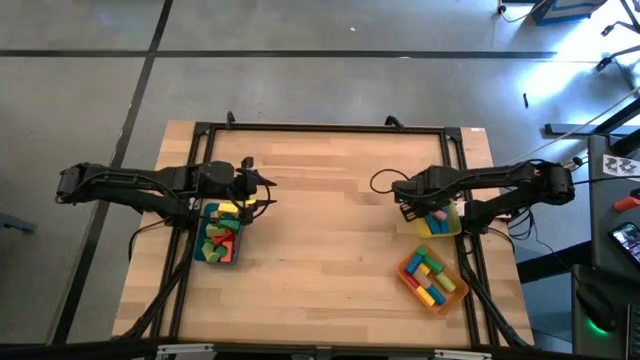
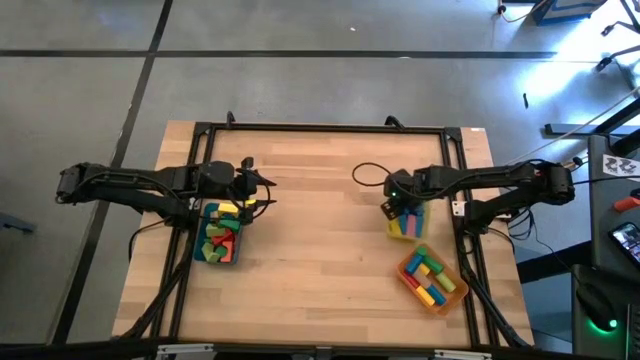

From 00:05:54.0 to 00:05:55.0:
Task: Sort blocks by size
Adjust the yellow bin on the table

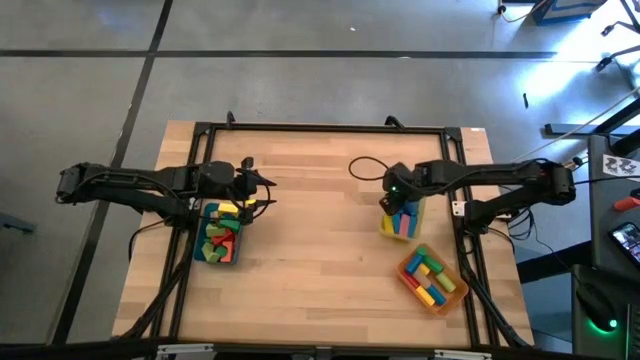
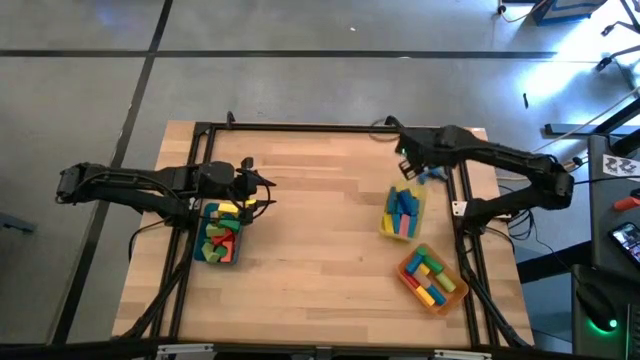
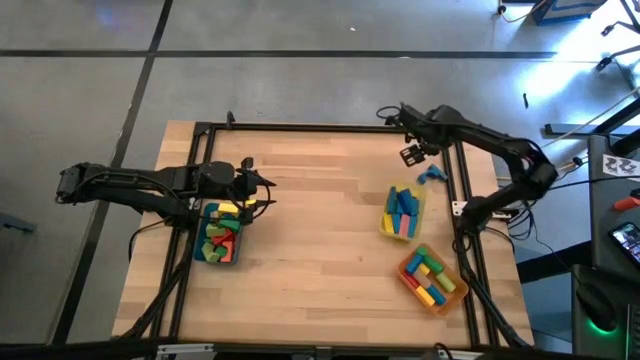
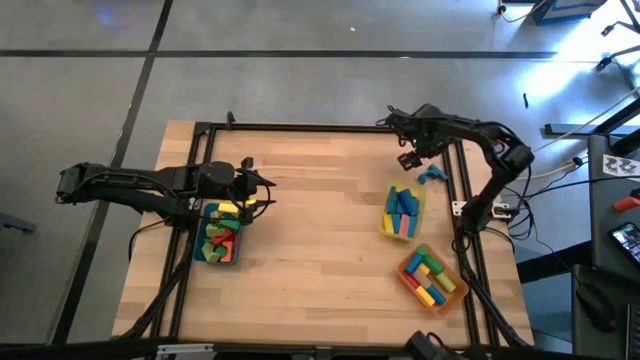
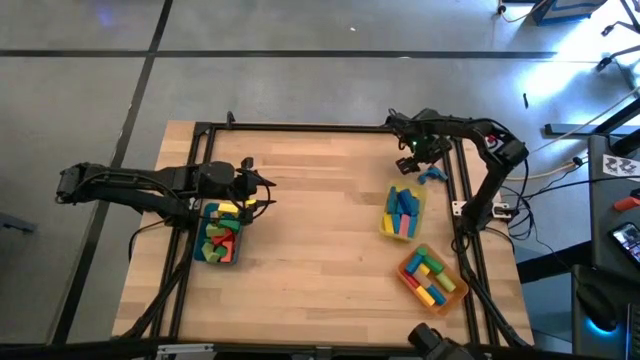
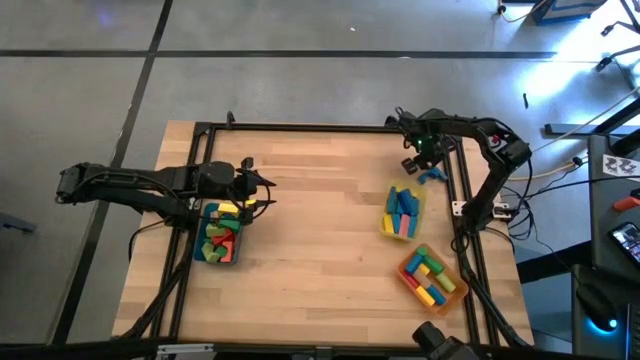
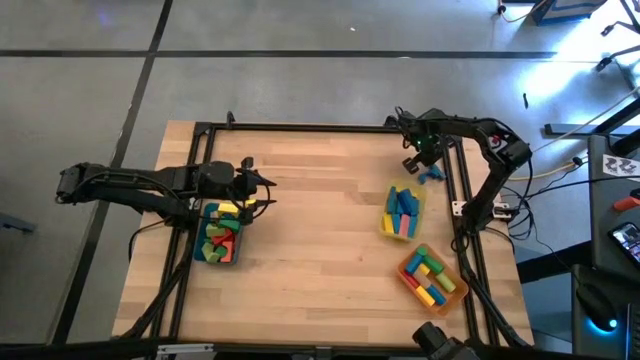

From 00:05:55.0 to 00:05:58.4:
Put the blue rectangular block into the yellow bin

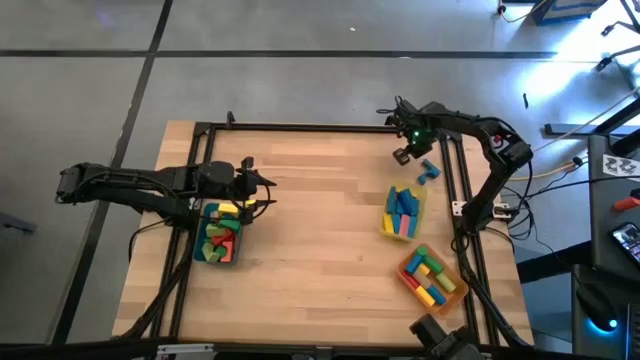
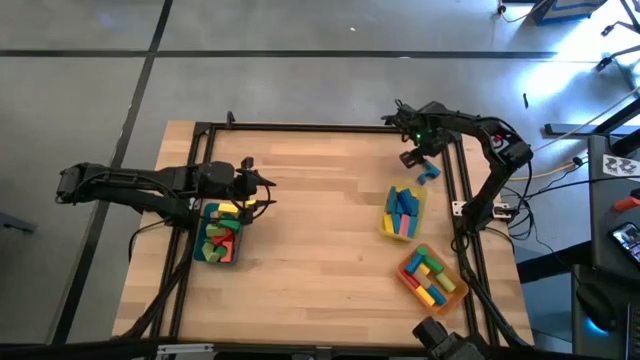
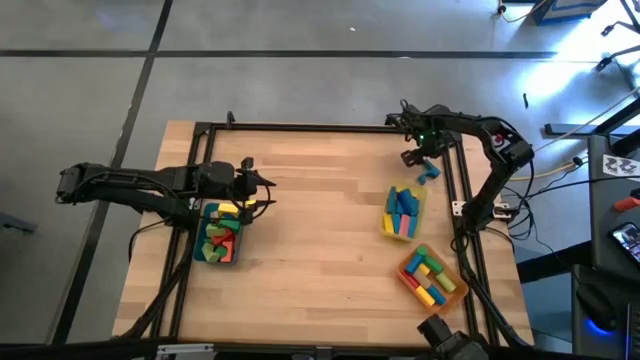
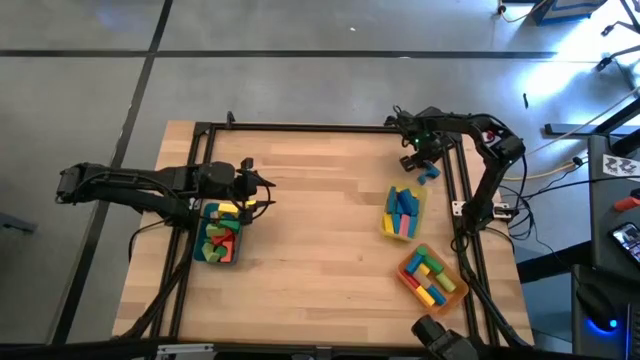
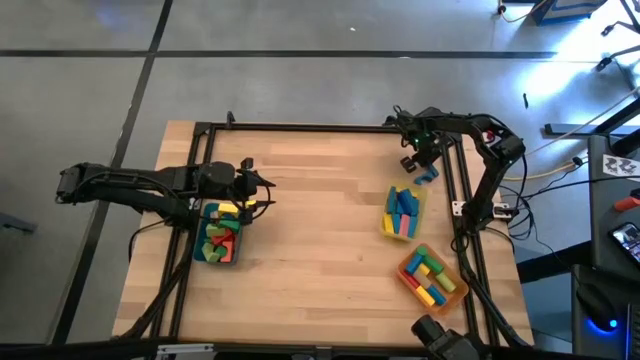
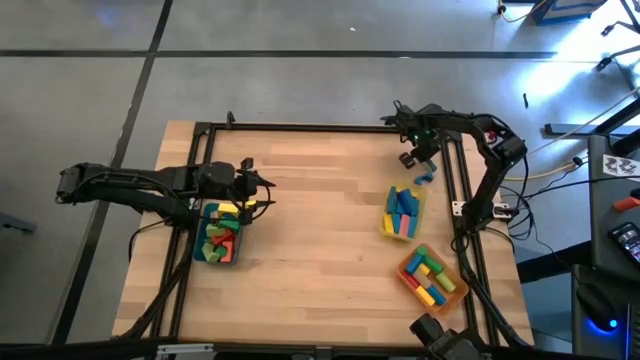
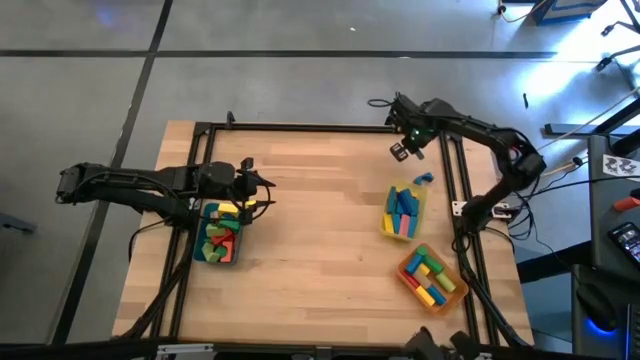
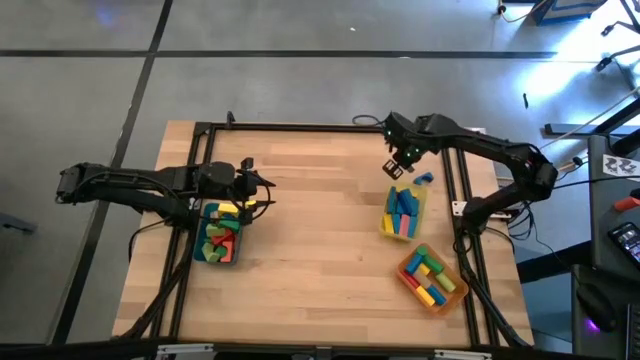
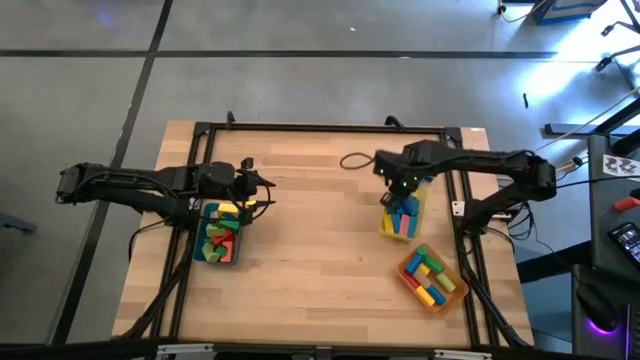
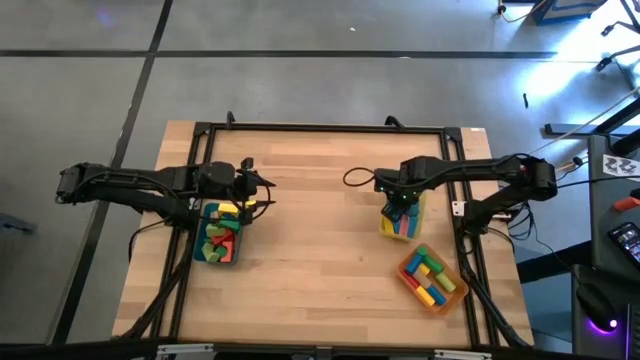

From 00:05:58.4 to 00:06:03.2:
Put the blue rectangular block into the yellow bin

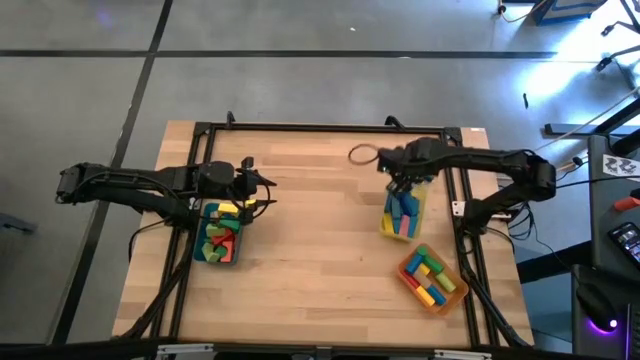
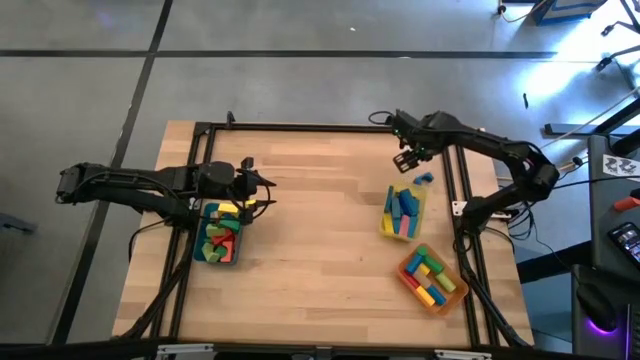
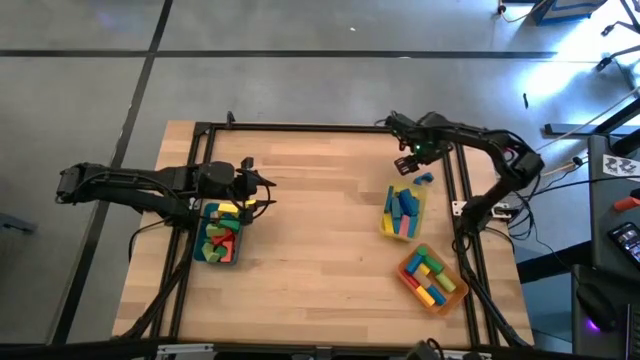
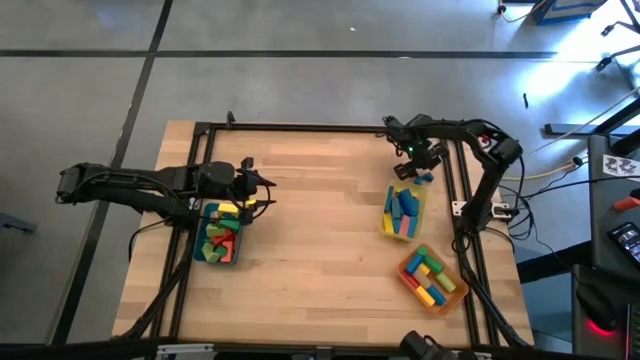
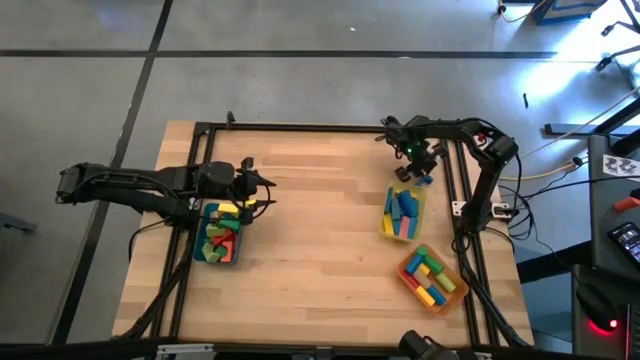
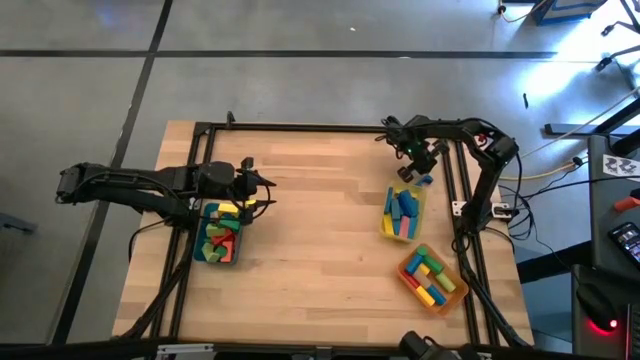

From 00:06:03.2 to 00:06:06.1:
Put the blue arch block into the blue bin

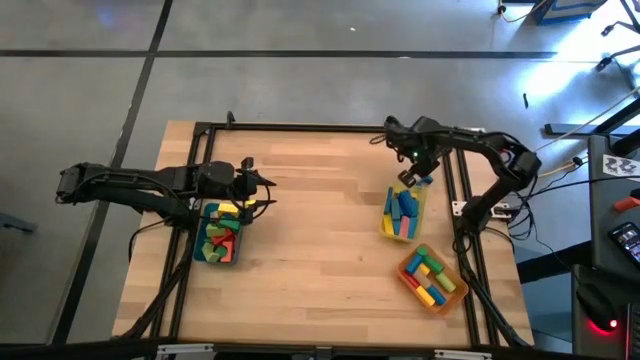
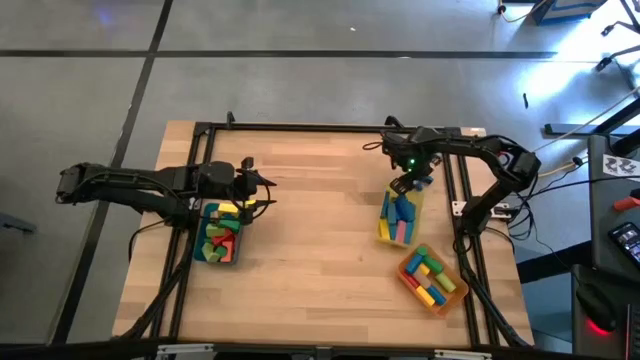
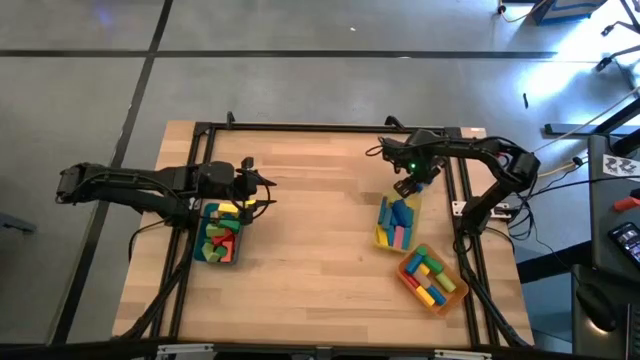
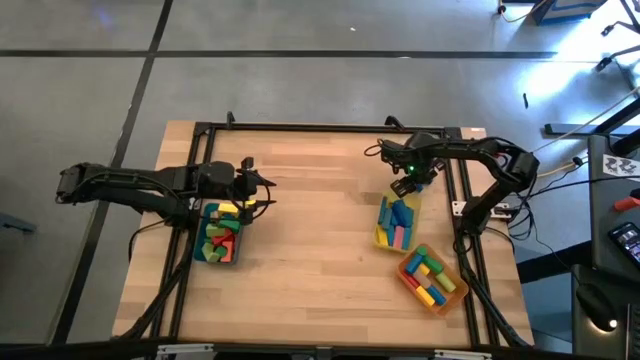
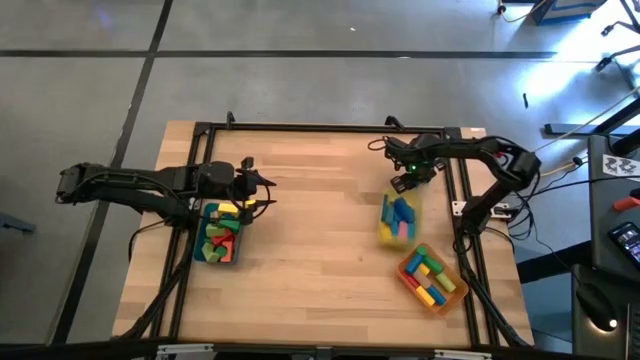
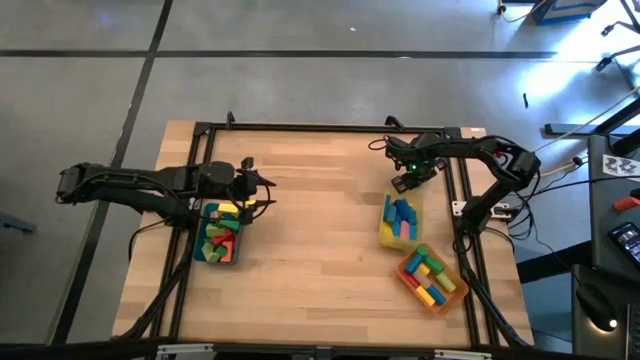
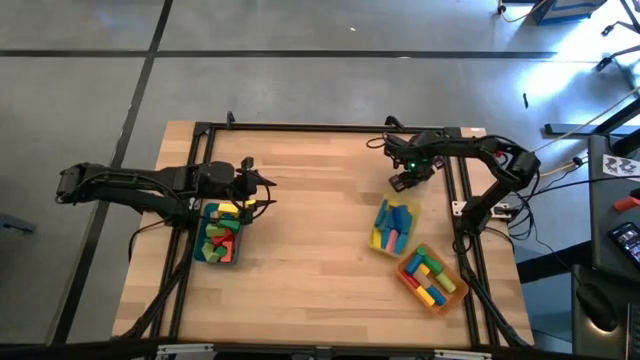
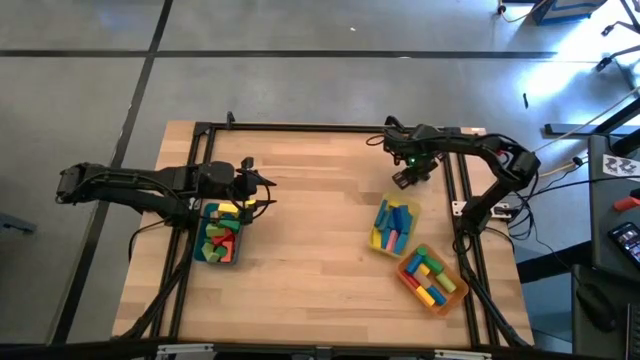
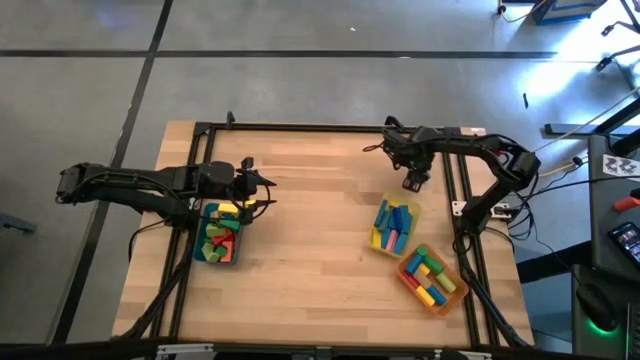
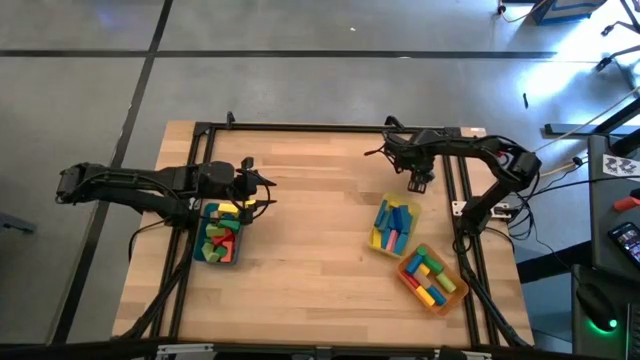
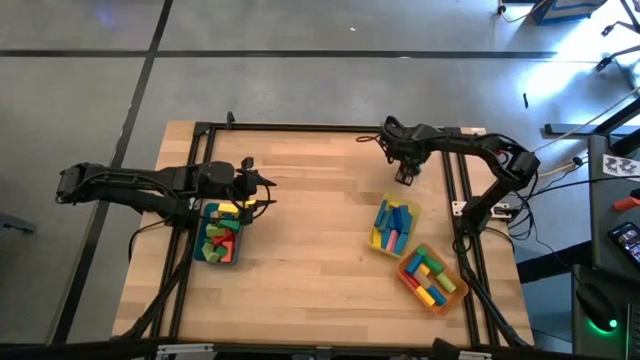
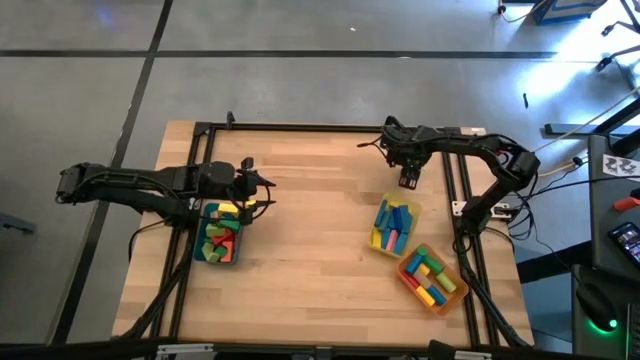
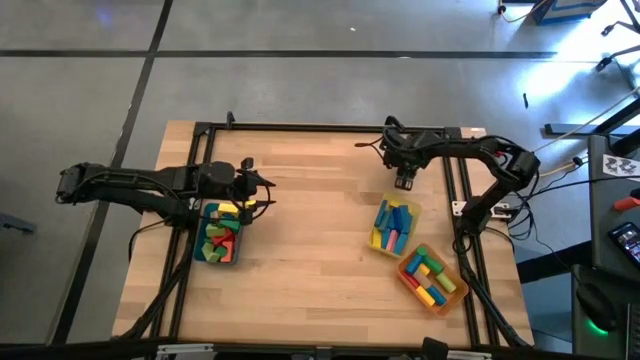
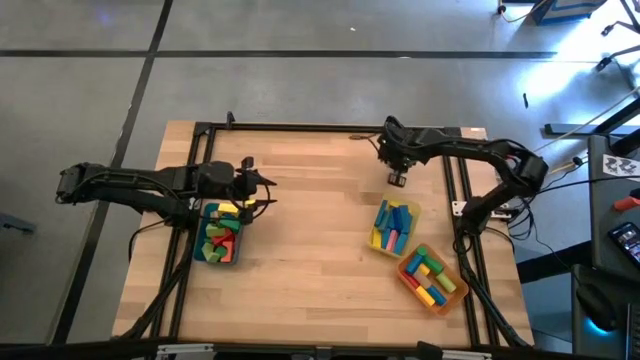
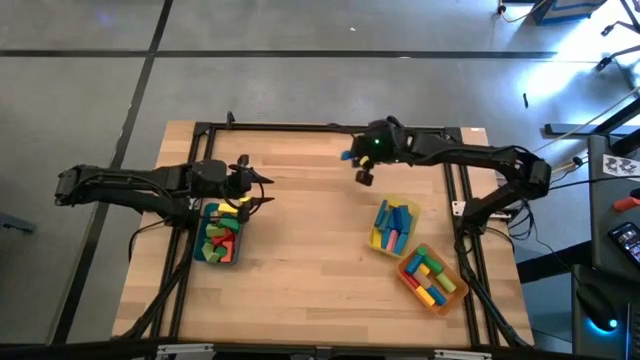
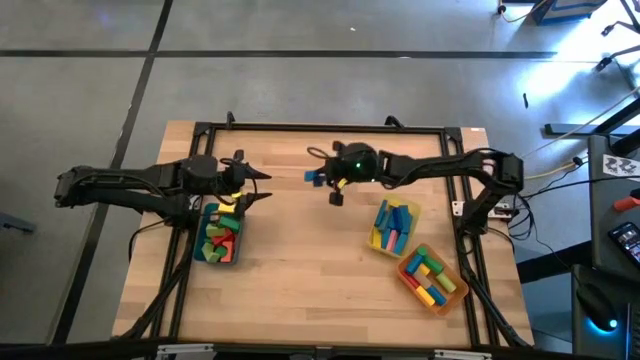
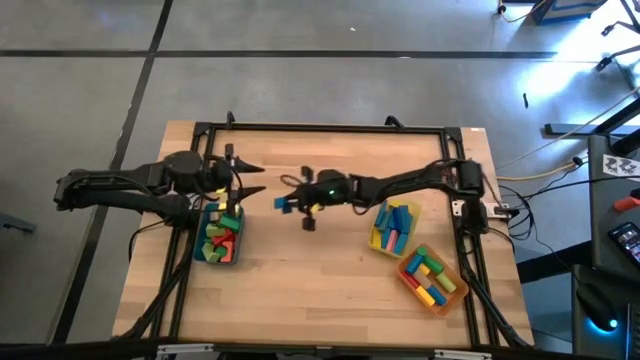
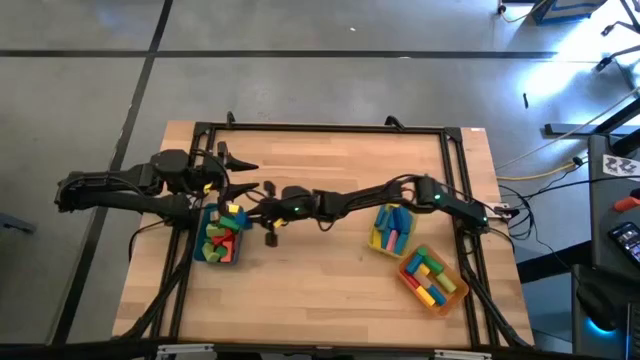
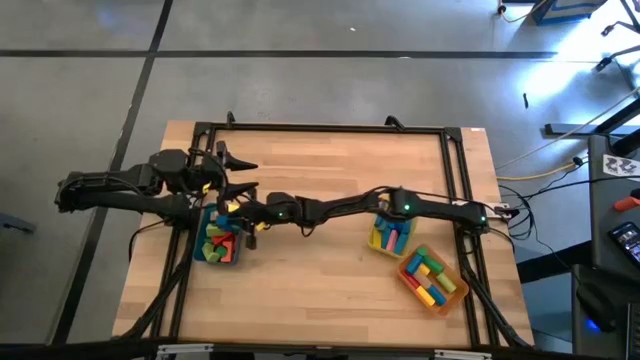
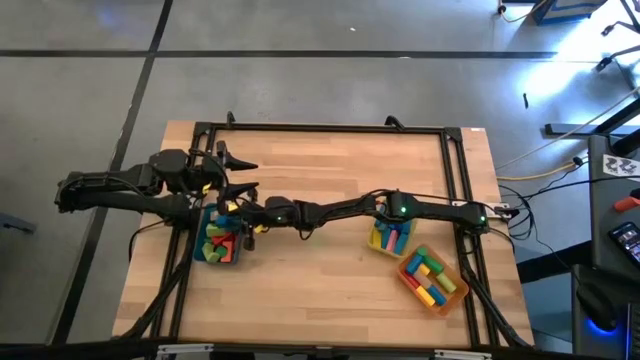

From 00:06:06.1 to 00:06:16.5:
Put the blue arch block into the blue bin
